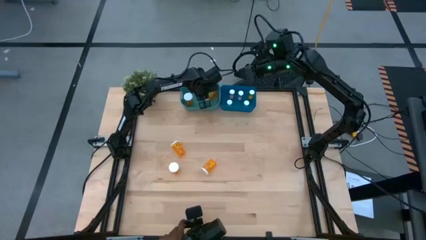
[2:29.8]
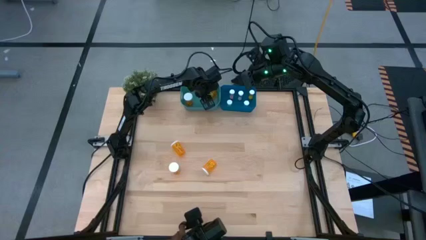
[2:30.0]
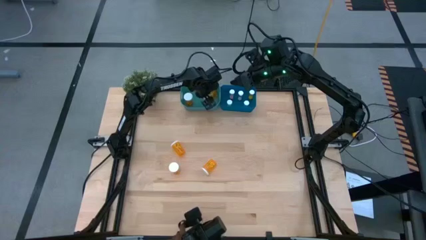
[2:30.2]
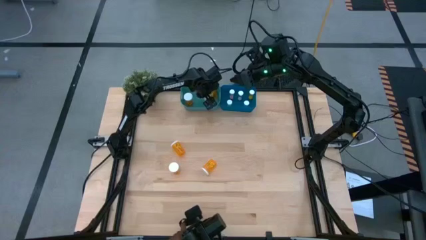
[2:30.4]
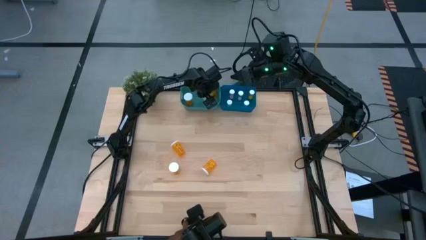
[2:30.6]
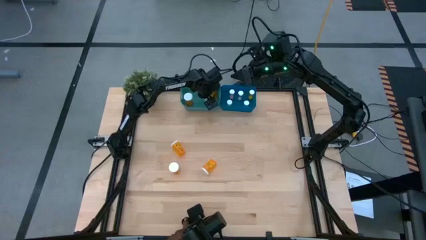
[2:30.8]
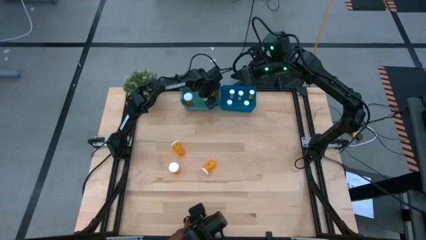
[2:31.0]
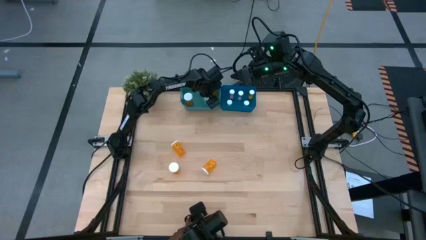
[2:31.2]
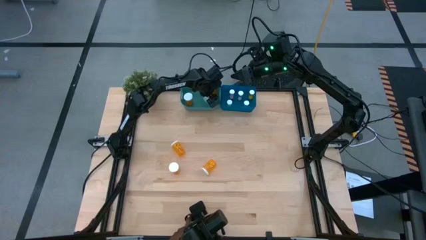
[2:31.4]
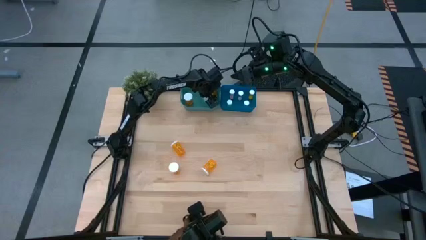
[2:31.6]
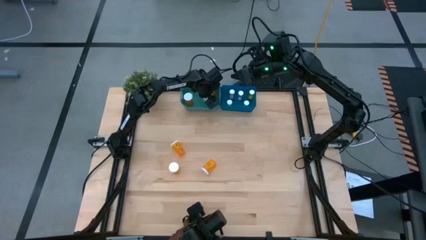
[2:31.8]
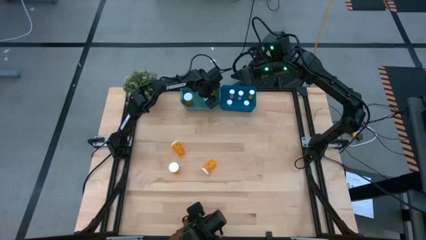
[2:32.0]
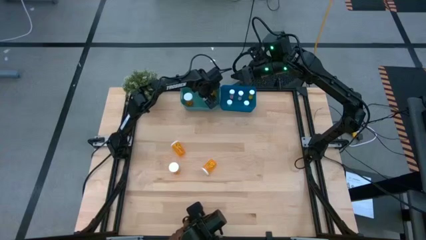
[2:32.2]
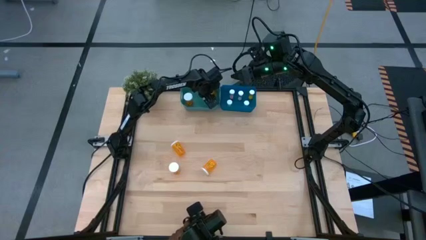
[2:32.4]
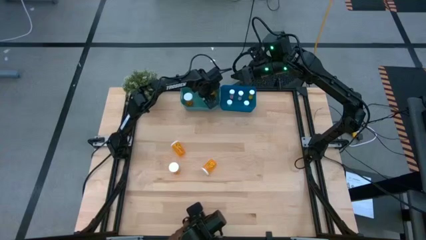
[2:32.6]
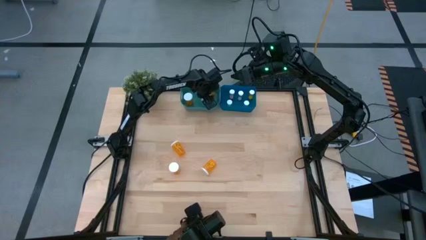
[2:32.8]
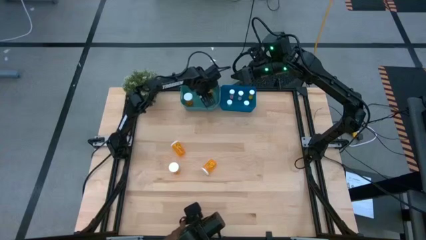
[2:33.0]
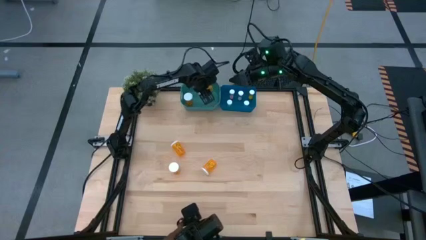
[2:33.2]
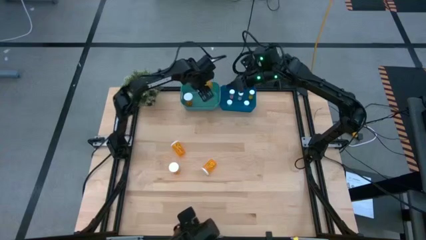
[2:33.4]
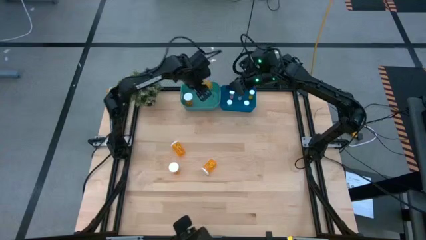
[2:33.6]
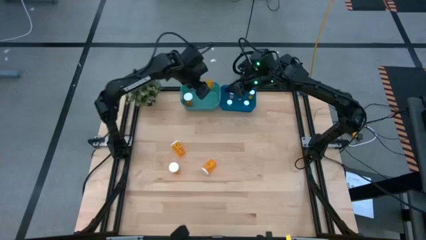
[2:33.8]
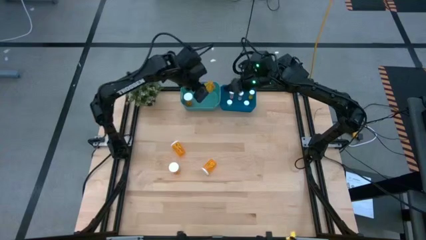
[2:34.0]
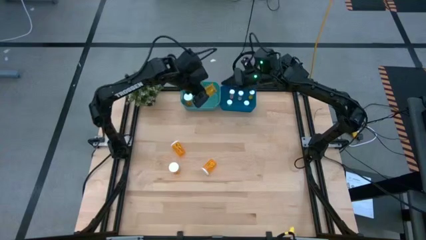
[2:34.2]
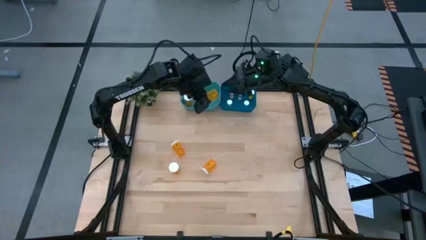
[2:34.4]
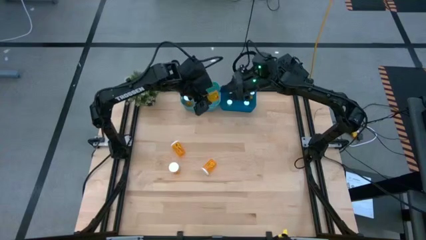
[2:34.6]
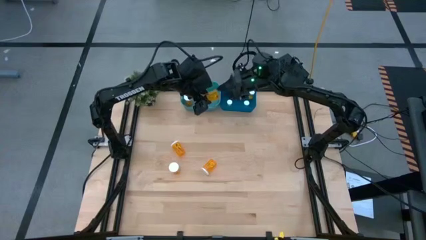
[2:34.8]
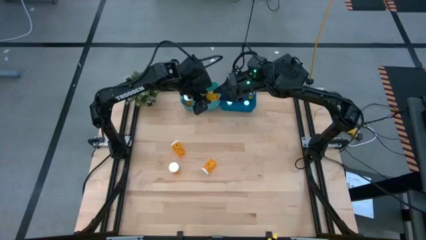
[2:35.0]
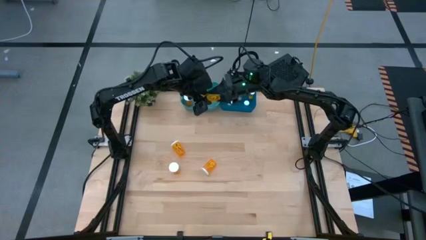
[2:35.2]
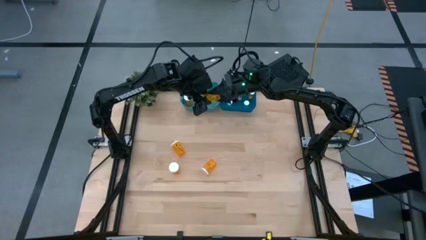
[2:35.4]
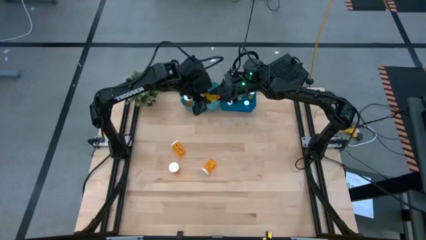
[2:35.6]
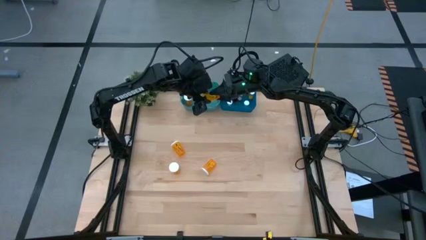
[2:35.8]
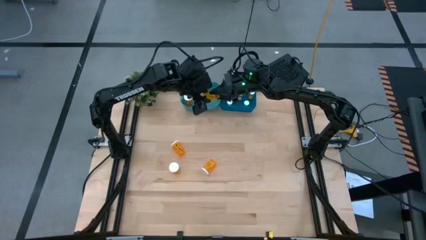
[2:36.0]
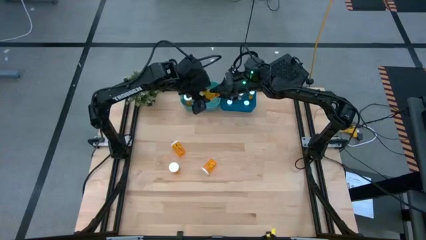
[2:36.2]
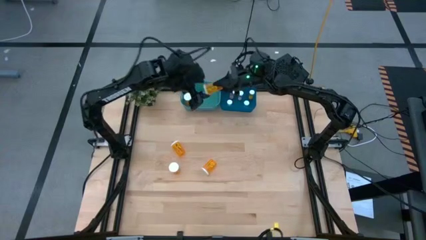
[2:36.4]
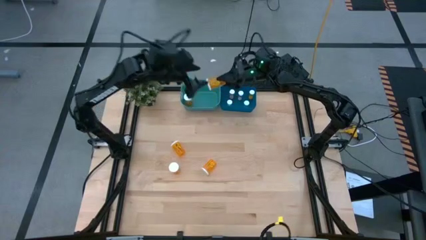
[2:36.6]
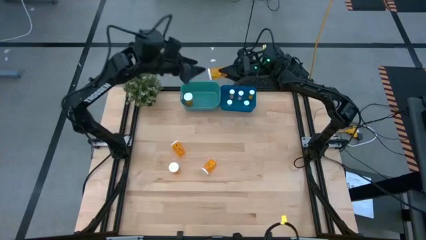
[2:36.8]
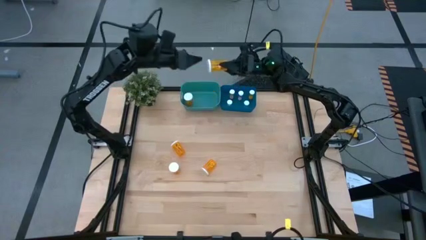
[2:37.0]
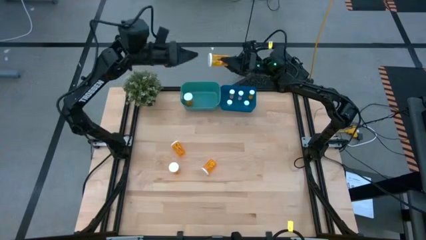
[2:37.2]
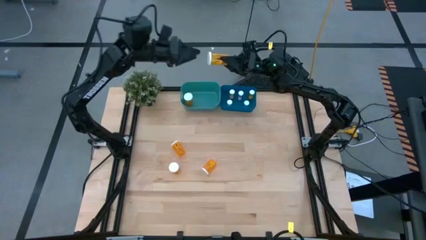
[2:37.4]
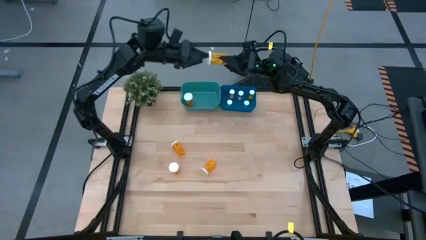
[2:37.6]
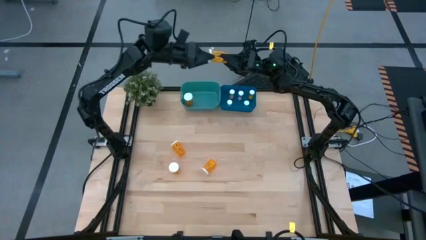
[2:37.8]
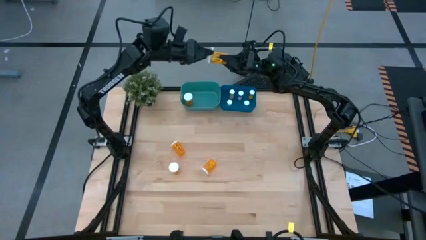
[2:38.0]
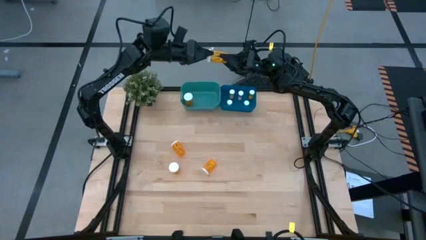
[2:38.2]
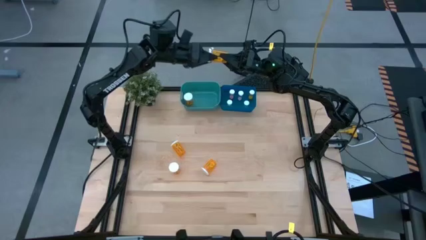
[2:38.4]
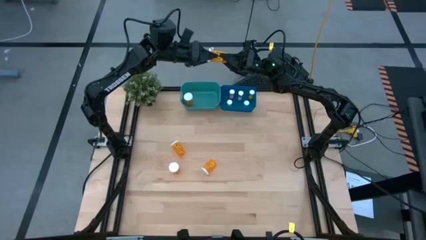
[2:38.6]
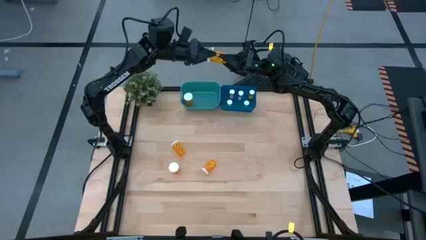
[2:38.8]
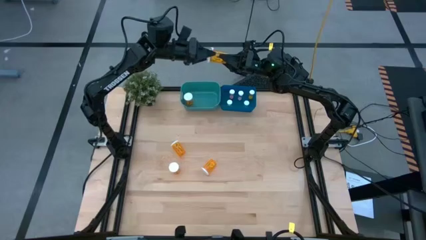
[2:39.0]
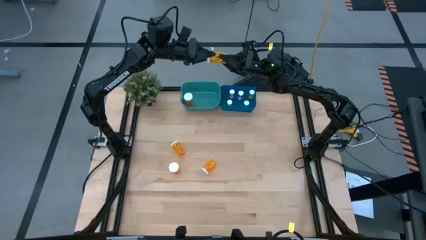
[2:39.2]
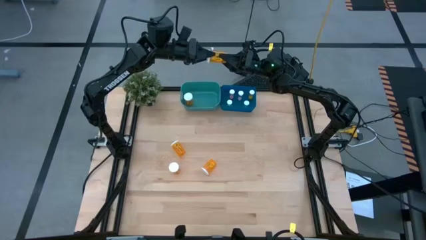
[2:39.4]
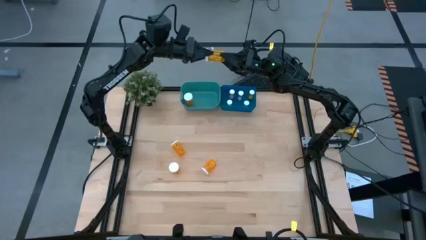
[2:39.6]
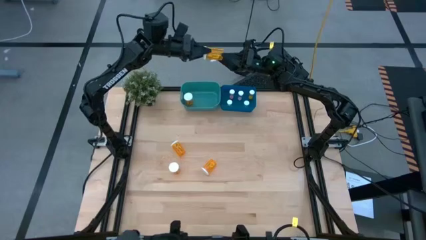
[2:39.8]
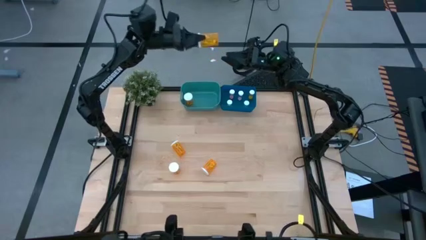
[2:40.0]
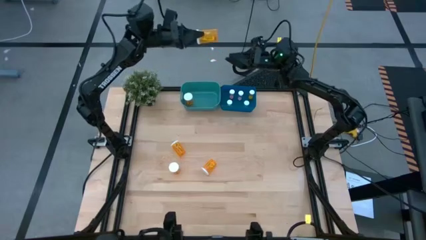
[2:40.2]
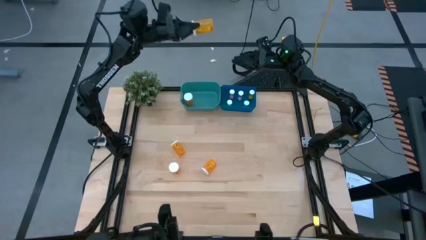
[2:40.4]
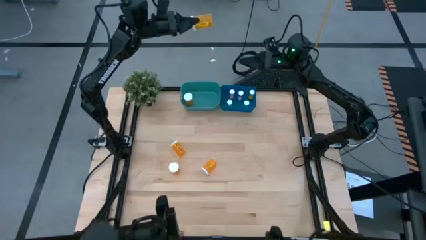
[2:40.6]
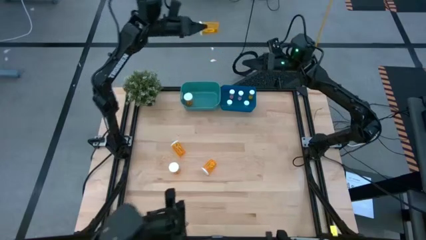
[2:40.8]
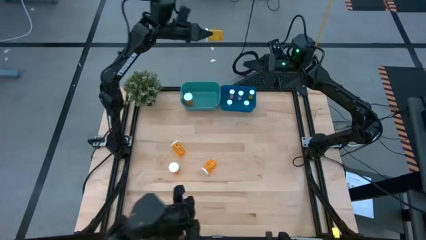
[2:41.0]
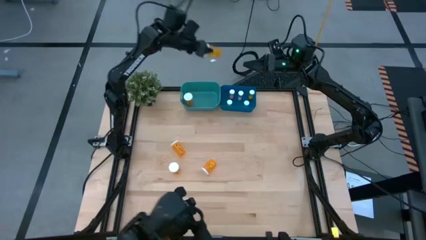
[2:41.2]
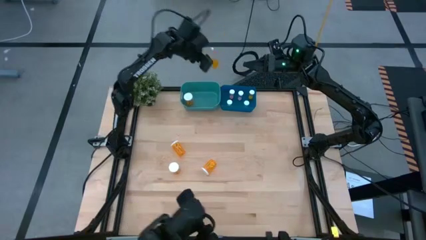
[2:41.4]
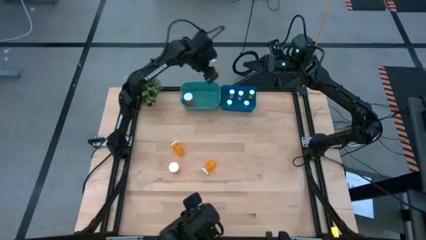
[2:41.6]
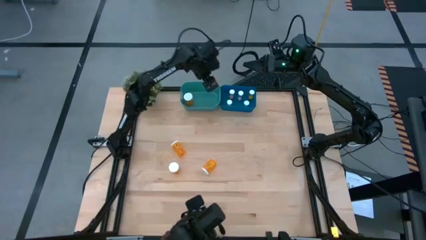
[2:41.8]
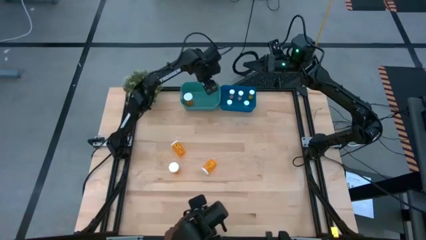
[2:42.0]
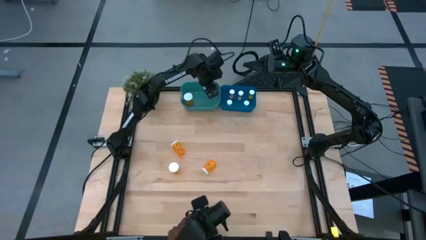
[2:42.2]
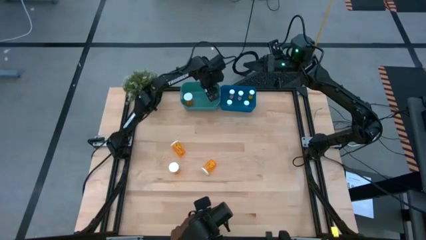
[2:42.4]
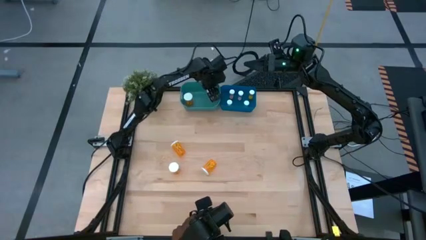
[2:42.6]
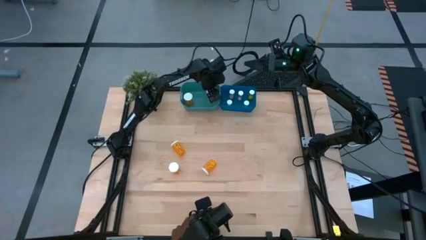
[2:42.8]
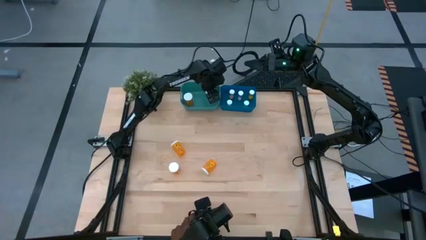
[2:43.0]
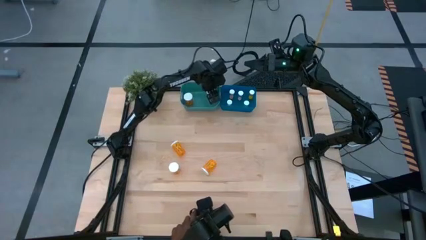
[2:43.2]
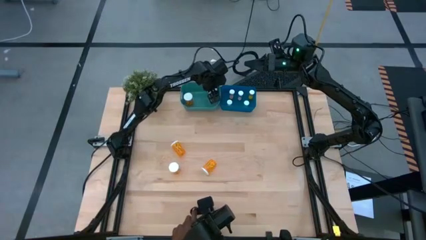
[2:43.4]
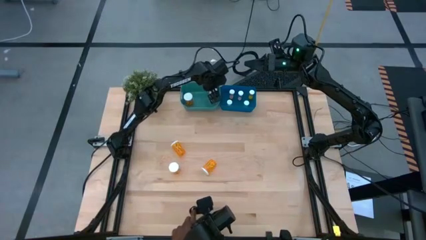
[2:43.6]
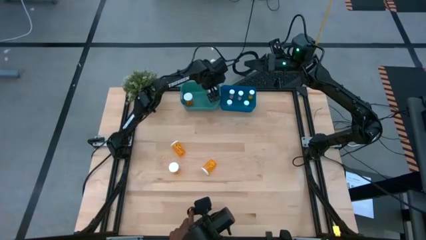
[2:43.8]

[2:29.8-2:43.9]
Task: Pick and place medicine bottles into bin by pill shape (circle, oval)
Put the large orange capsule bottle into the green bin

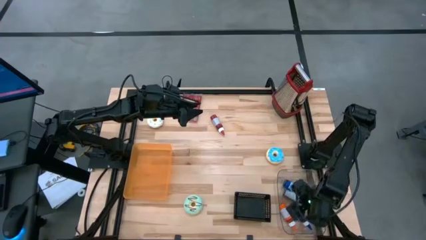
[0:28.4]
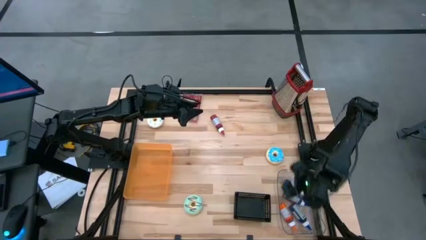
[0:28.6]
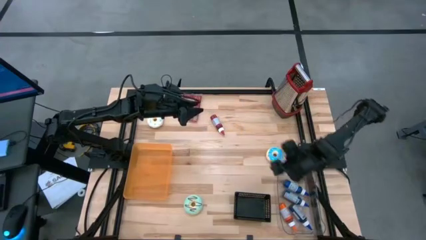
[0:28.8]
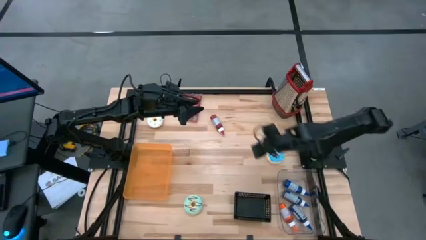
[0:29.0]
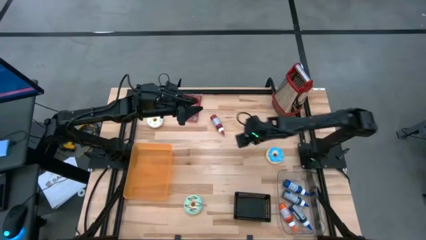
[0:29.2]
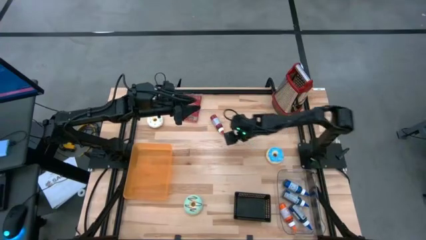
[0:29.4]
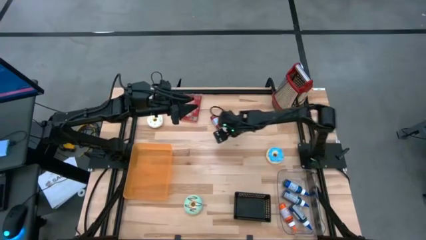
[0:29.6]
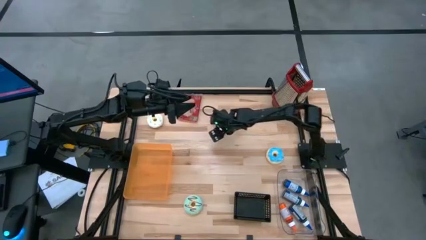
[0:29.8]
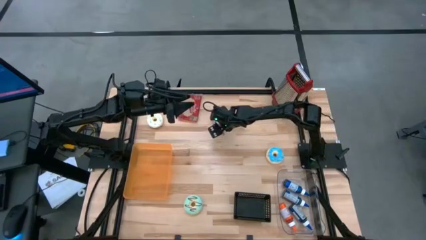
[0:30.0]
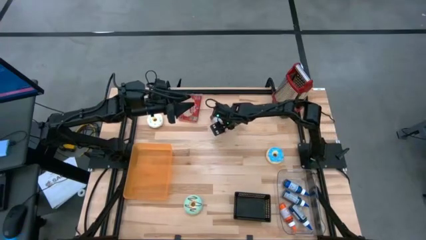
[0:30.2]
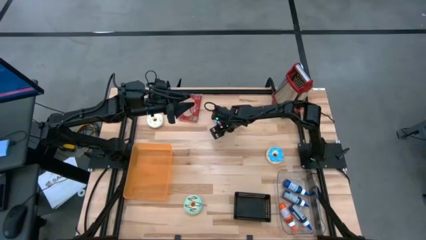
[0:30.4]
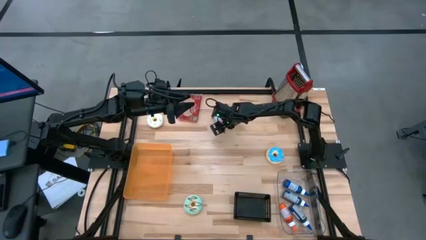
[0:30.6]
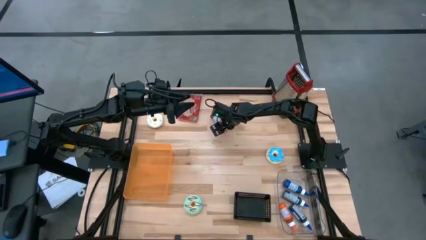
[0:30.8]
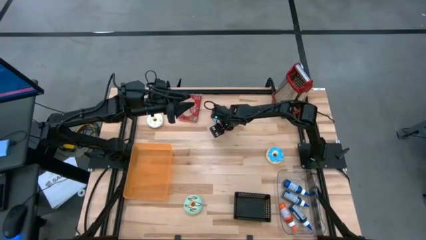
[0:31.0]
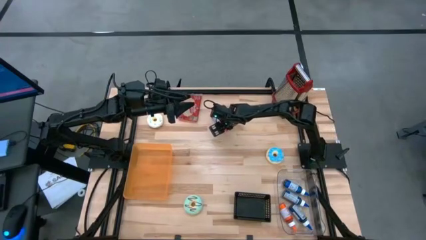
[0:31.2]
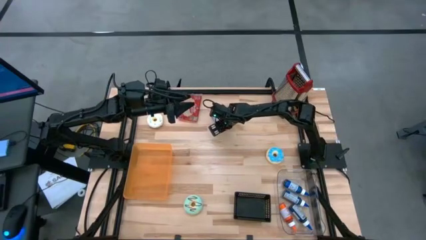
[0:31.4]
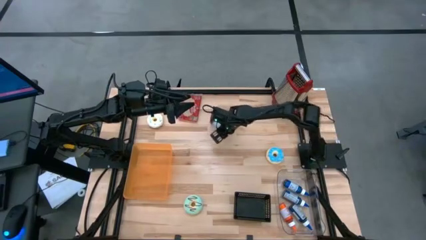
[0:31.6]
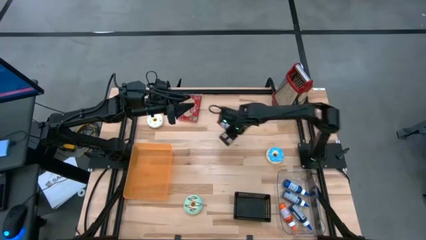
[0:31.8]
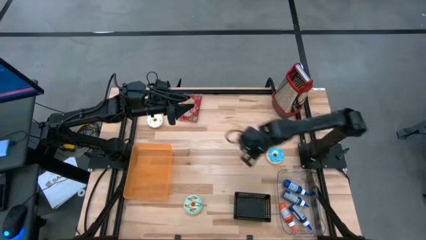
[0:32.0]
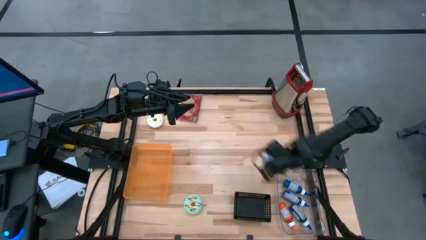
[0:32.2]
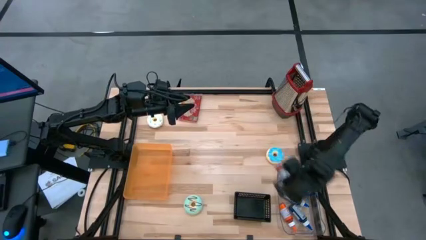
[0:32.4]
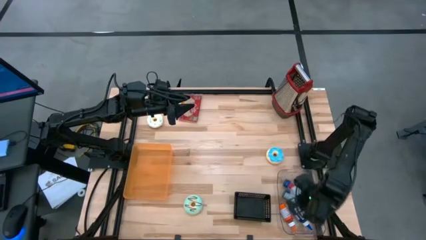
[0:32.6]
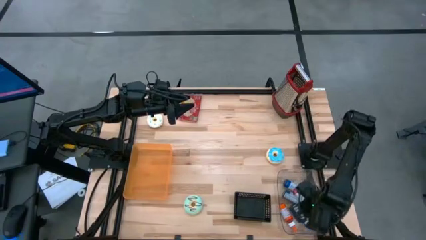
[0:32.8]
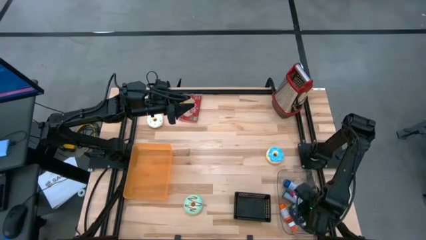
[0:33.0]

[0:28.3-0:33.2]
Task: Pick & Place Food Item
Put the red food coloring bottle into the transparent bin
